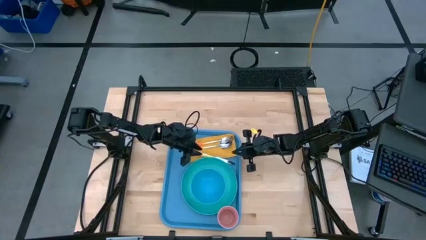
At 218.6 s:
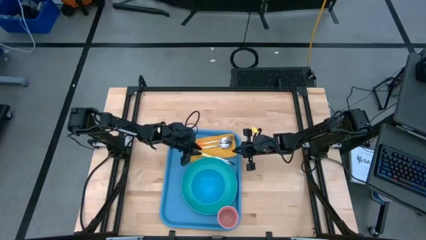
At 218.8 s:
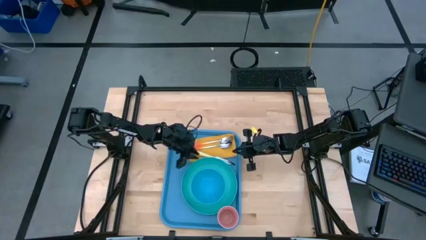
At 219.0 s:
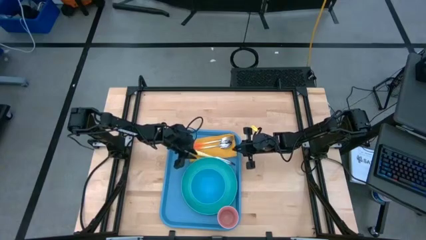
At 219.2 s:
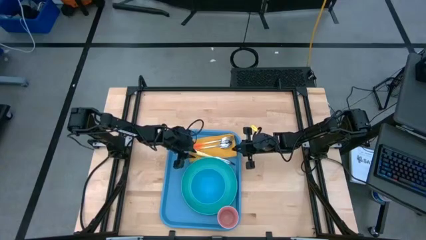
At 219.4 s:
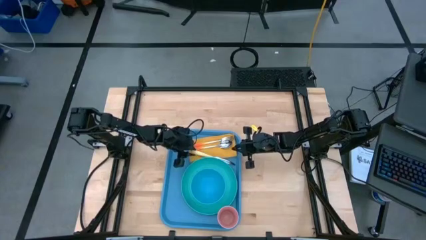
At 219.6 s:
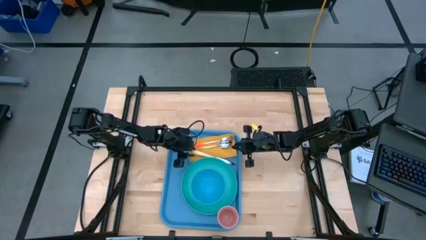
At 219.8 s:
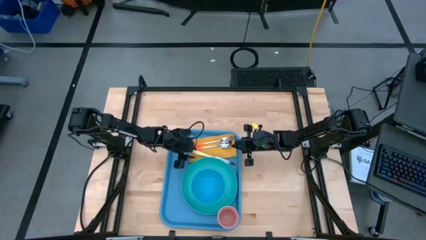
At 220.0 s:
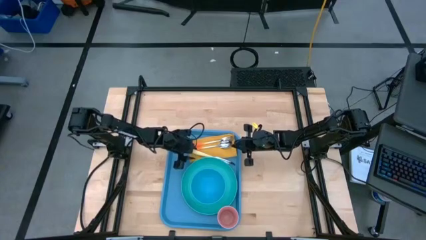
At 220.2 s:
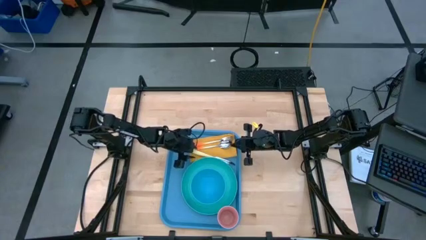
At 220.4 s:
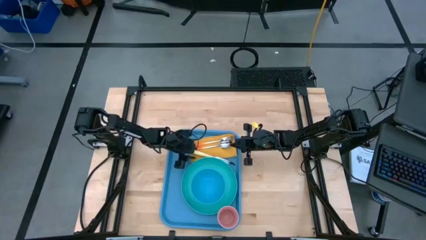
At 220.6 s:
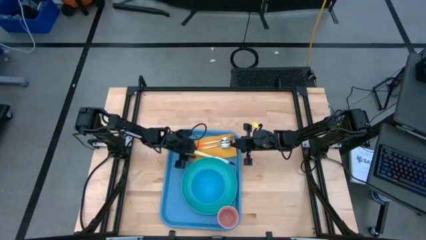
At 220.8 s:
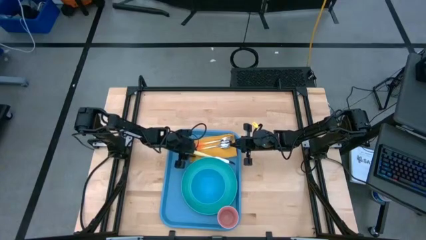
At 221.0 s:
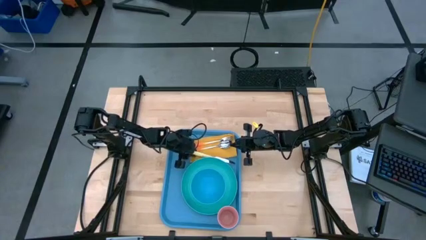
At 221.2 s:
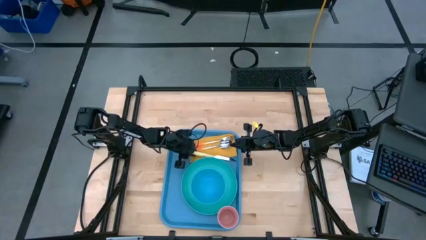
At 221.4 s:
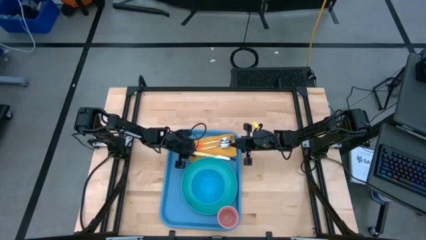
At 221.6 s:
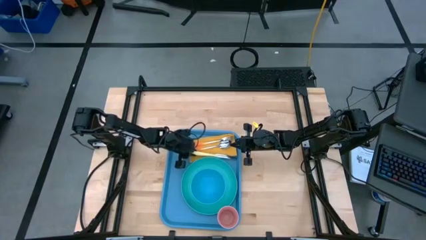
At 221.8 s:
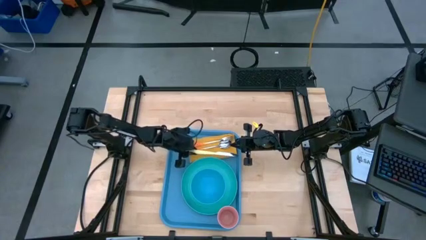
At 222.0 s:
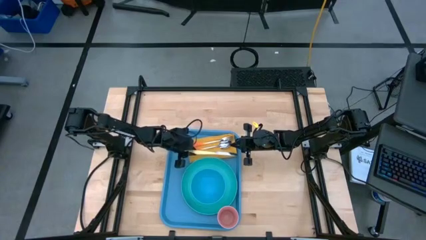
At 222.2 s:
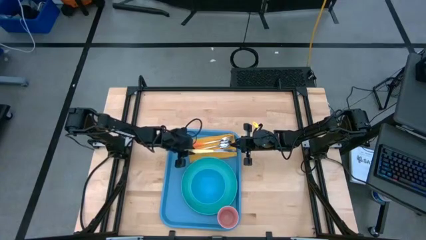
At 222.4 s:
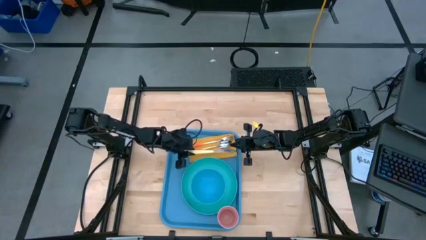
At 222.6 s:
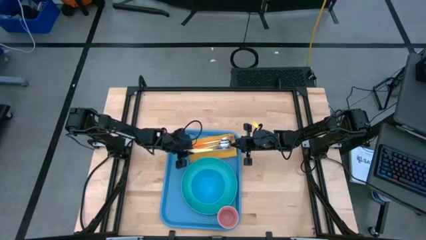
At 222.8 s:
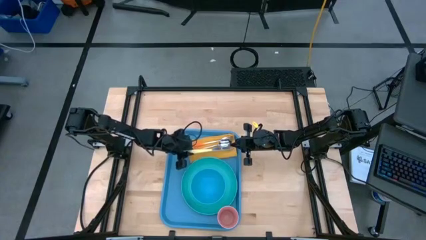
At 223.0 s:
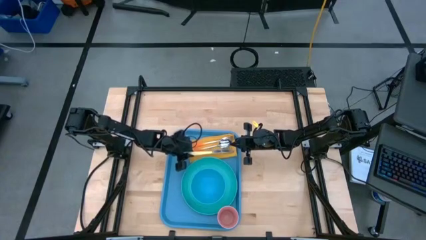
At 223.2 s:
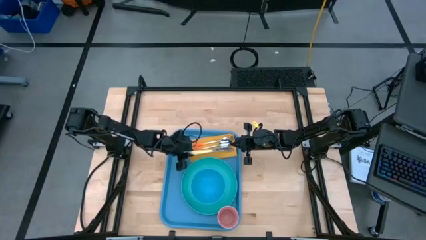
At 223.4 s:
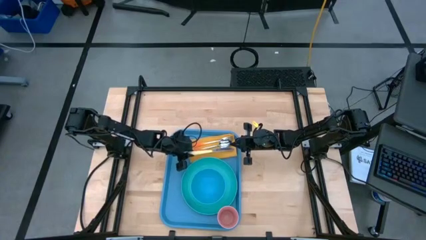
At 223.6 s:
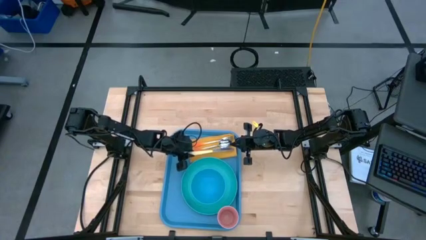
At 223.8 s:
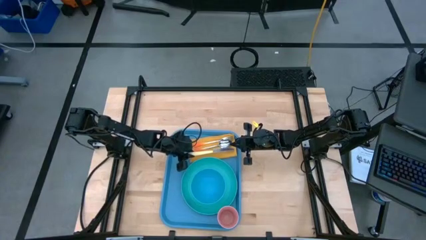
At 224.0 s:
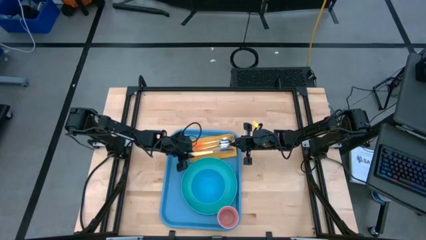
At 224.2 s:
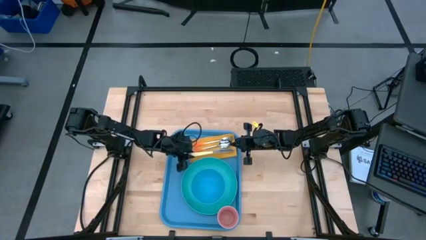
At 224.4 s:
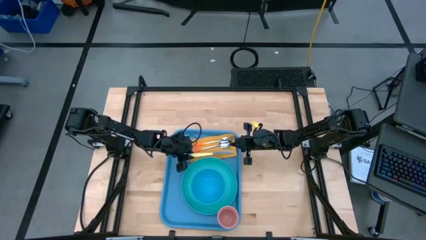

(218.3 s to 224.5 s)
Task: Set up tray
Adjust the light green knife on the orange napkin

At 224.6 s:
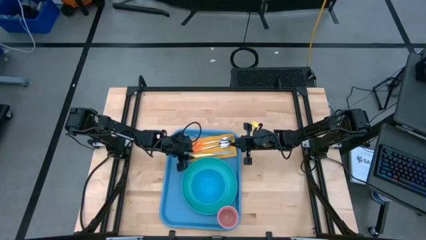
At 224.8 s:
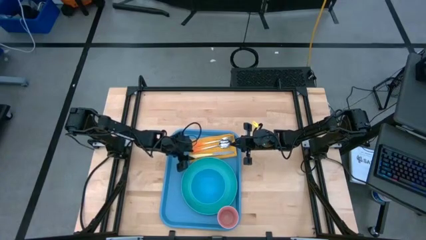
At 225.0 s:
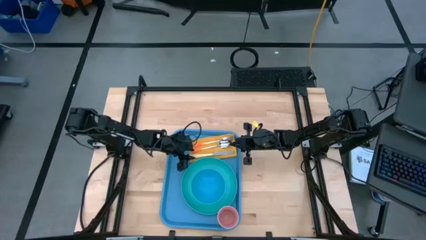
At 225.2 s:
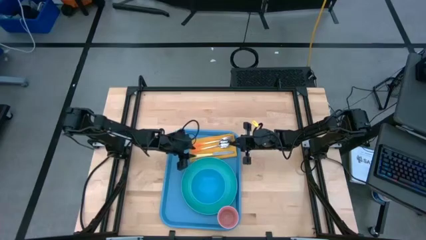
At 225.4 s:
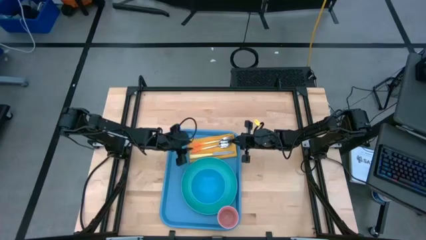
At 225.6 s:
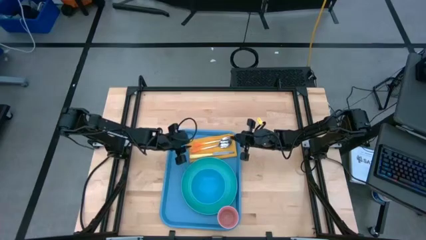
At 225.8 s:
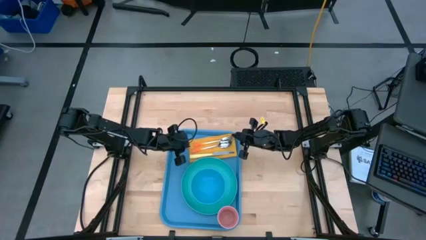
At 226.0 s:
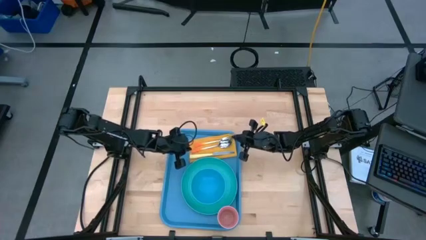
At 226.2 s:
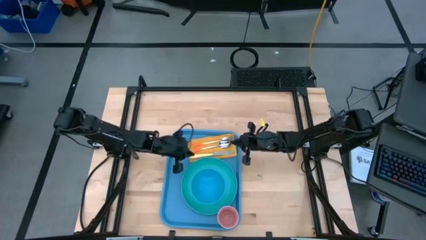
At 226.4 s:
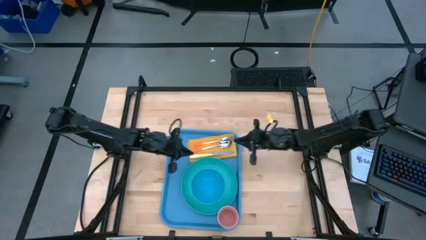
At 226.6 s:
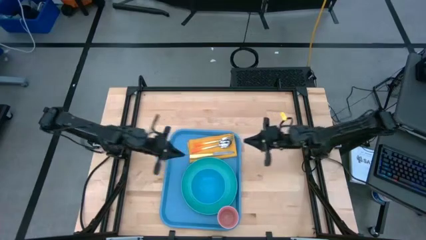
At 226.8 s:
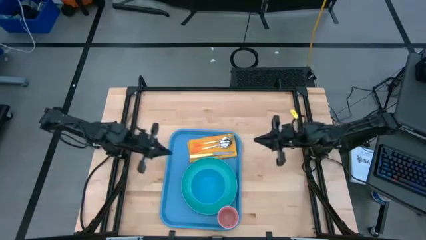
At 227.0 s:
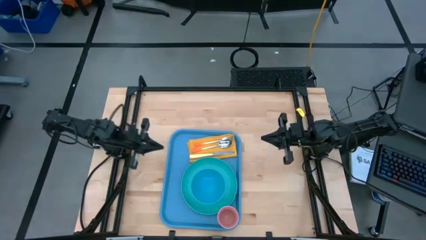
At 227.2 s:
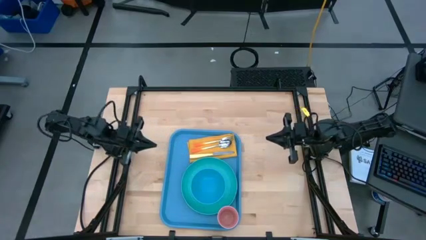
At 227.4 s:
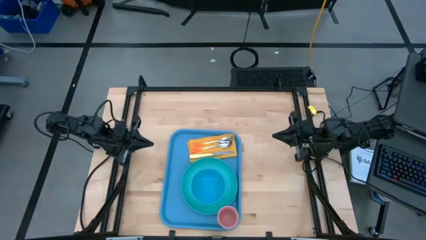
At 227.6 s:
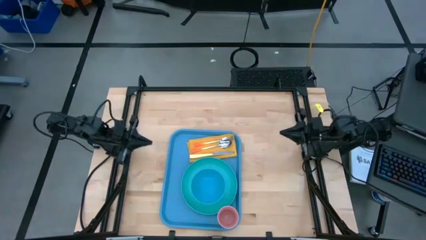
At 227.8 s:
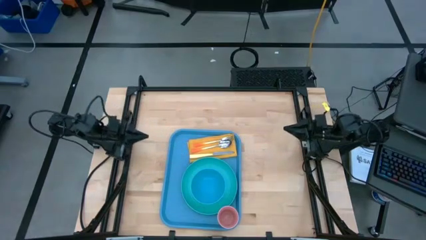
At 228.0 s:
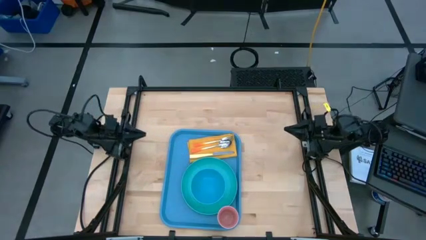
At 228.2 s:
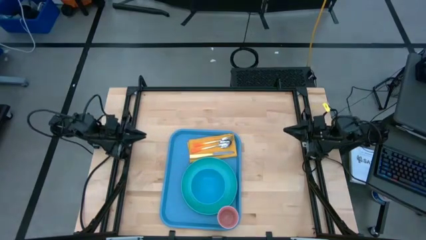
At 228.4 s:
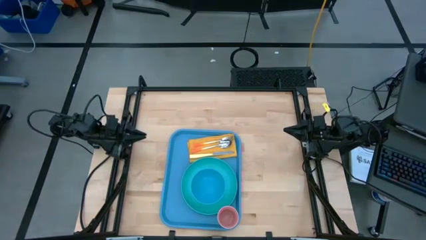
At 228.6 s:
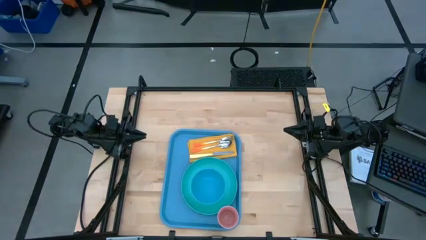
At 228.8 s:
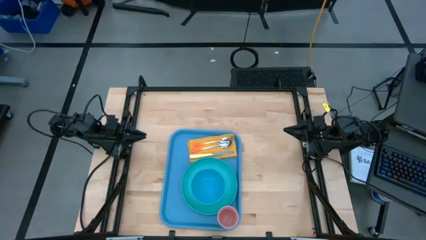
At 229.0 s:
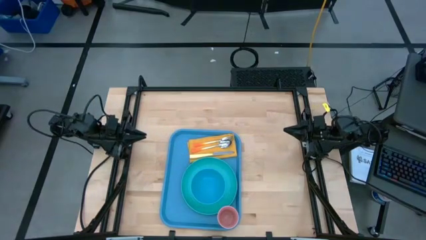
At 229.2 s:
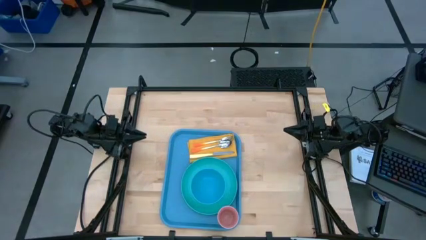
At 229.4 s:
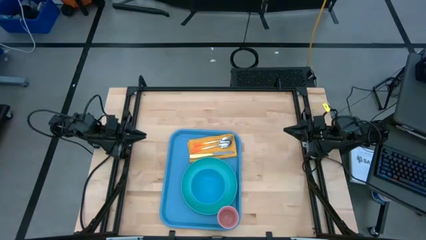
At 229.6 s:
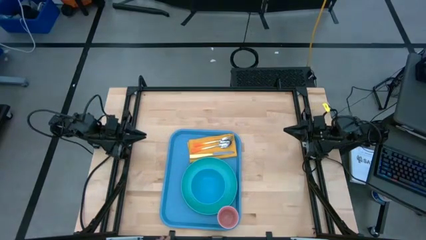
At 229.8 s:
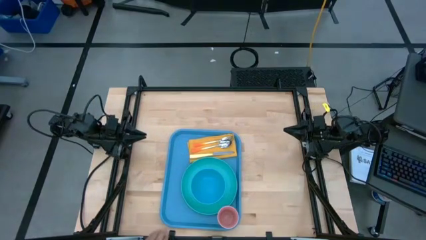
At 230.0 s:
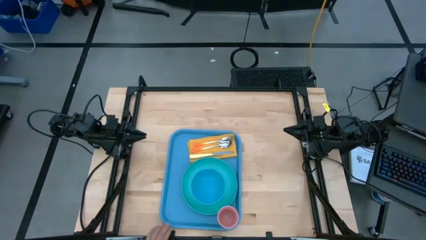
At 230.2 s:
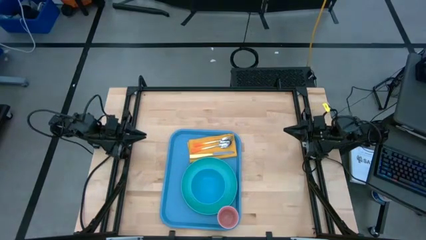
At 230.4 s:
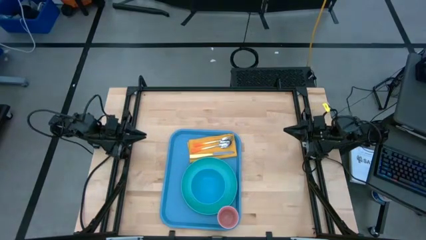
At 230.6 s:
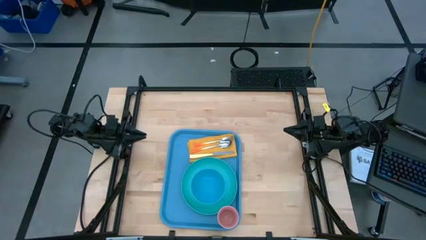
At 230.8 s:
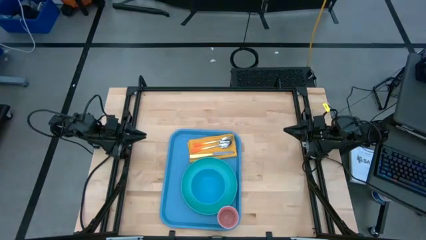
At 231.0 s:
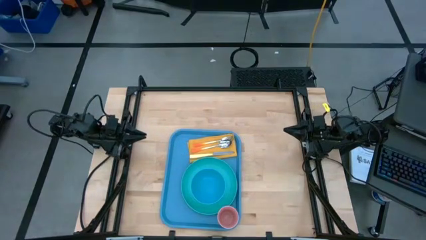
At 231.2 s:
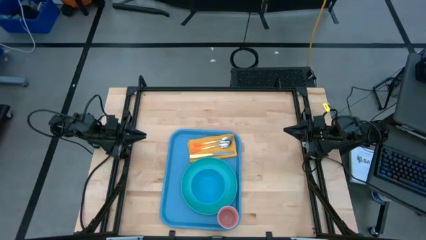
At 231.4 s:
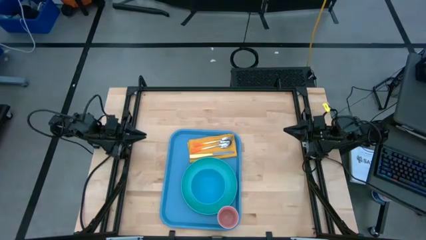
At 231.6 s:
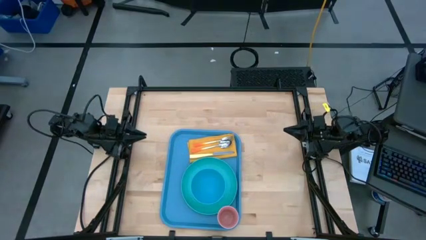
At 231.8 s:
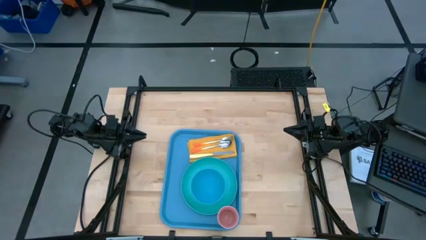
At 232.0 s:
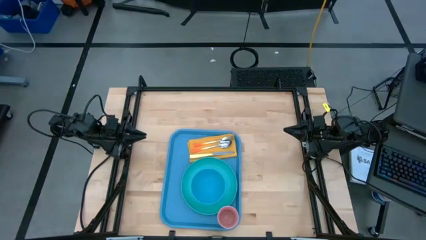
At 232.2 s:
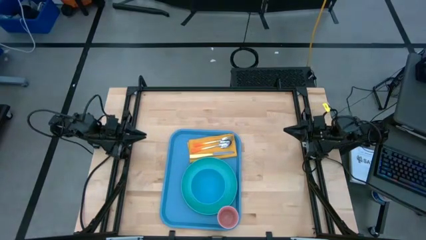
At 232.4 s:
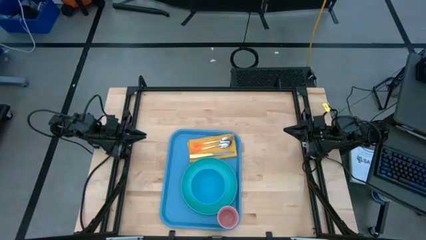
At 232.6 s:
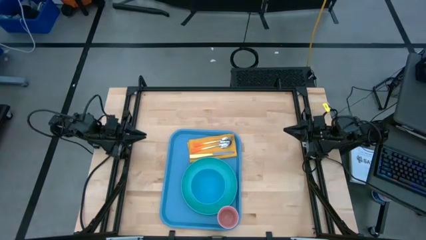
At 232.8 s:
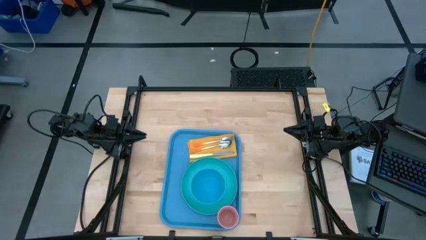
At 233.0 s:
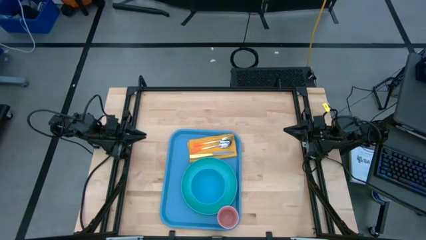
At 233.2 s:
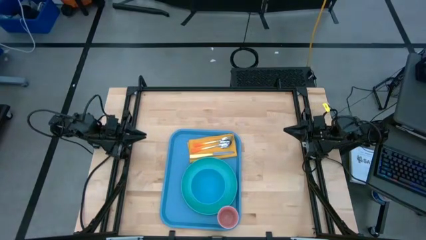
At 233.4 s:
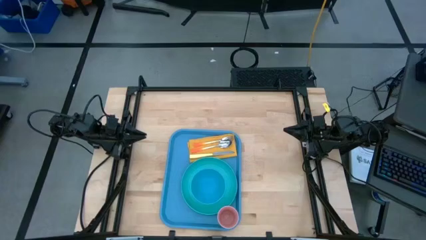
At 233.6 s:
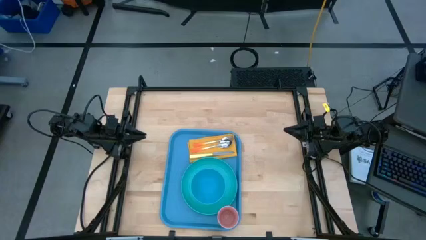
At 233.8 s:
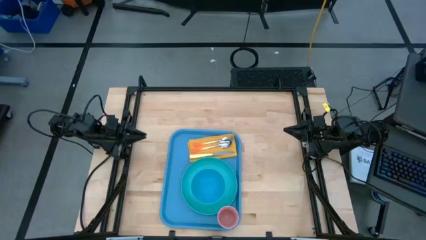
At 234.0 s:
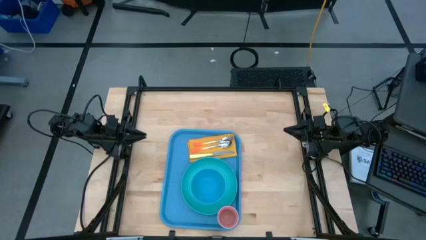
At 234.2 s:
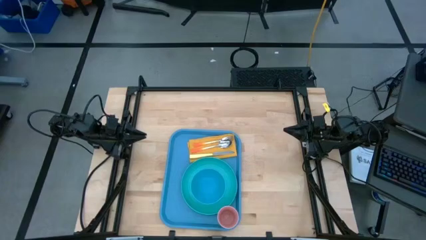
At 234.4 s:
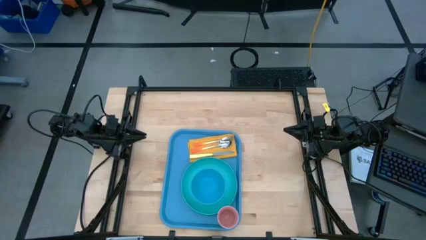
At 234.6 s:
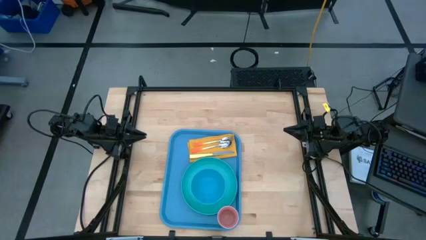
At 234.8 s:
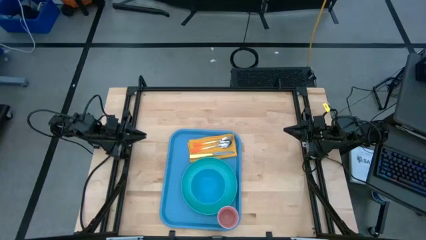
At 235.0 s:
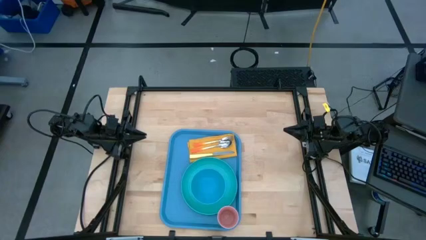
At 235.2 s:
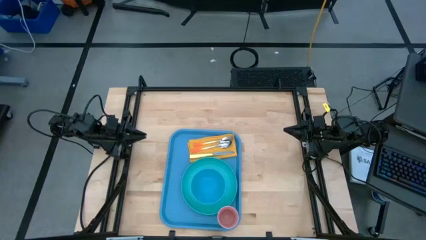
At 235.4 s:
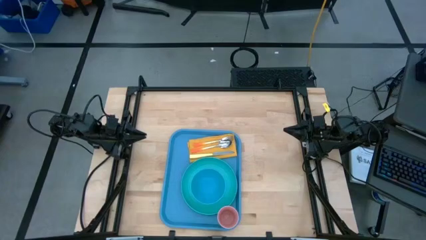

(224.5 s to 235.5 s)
Return to Home Position
